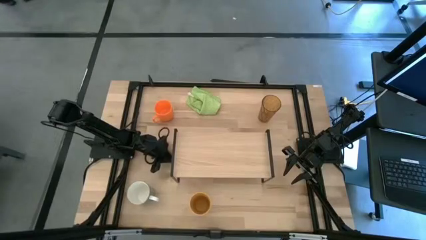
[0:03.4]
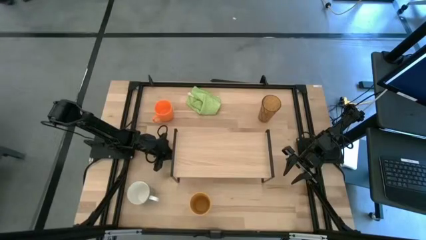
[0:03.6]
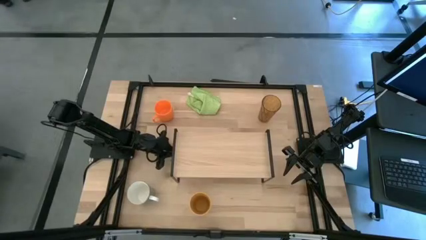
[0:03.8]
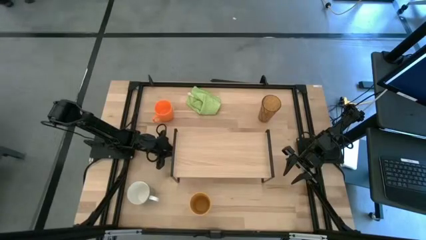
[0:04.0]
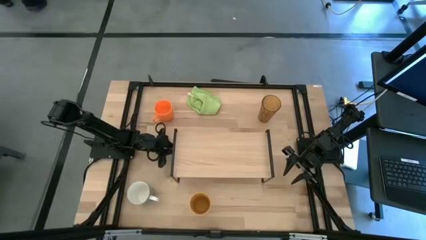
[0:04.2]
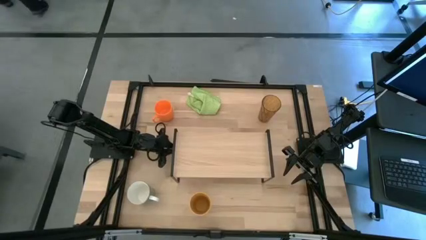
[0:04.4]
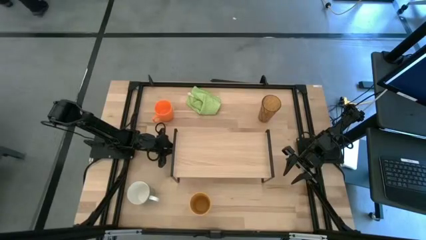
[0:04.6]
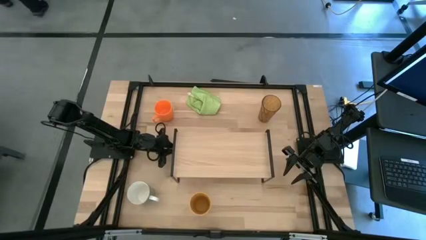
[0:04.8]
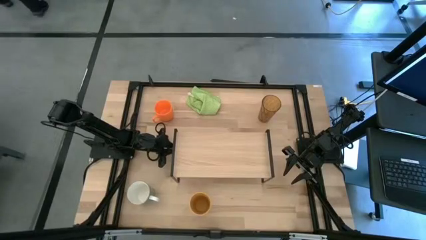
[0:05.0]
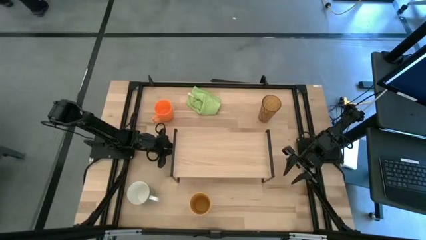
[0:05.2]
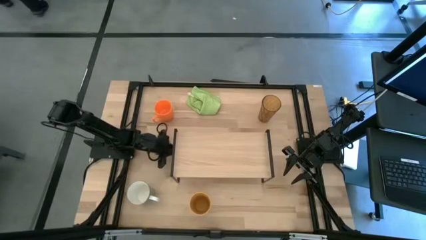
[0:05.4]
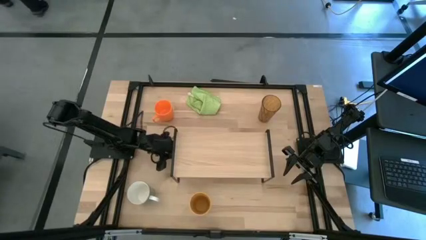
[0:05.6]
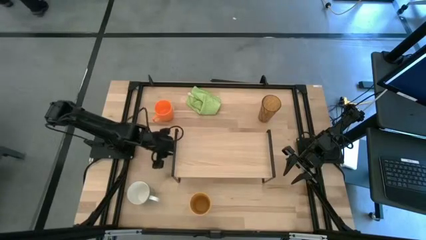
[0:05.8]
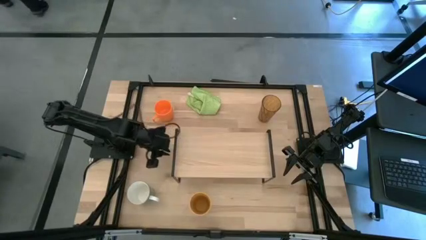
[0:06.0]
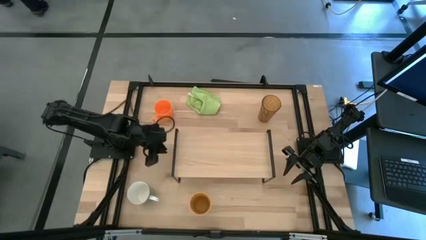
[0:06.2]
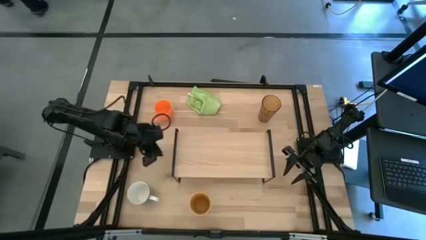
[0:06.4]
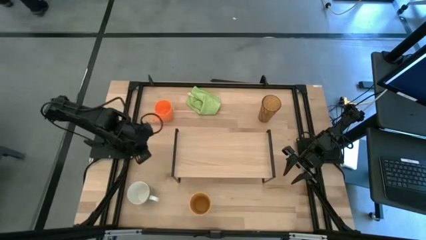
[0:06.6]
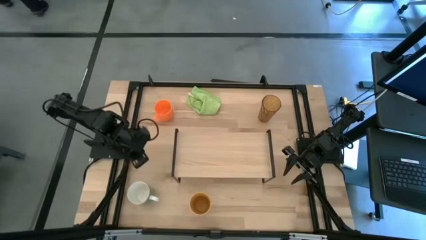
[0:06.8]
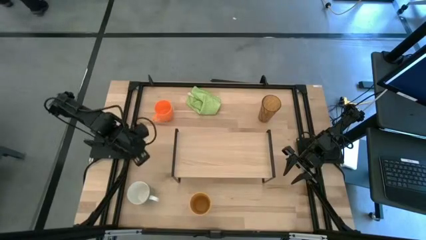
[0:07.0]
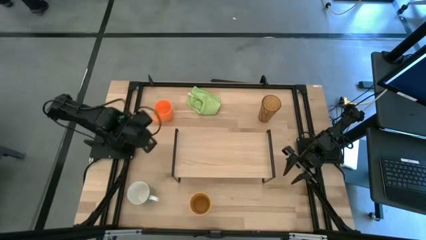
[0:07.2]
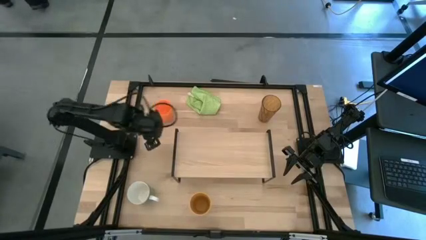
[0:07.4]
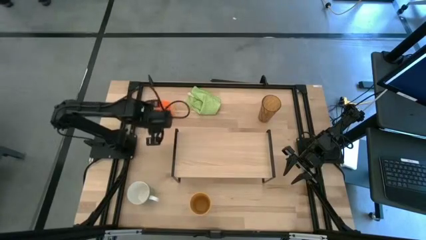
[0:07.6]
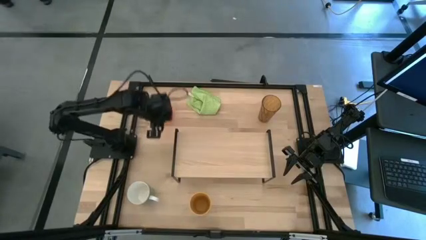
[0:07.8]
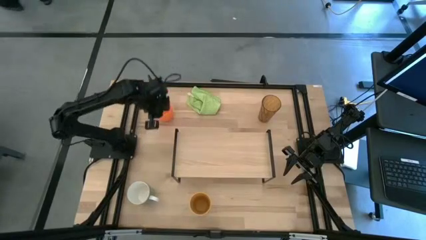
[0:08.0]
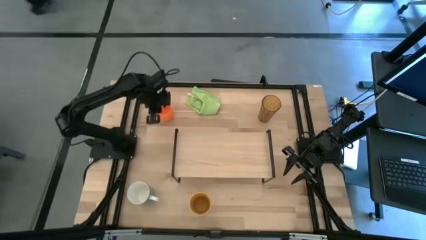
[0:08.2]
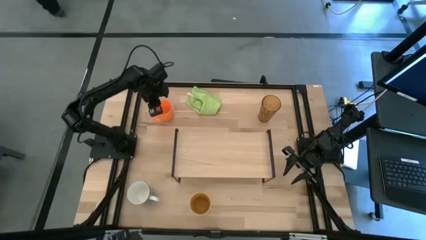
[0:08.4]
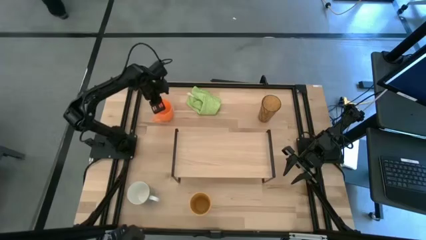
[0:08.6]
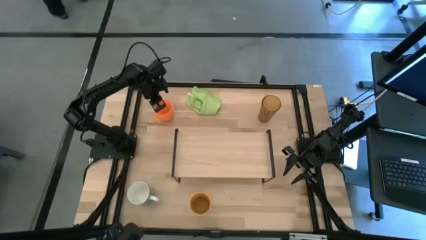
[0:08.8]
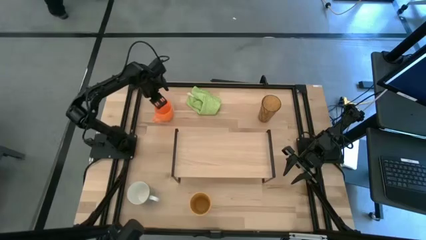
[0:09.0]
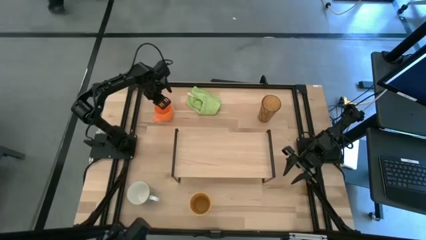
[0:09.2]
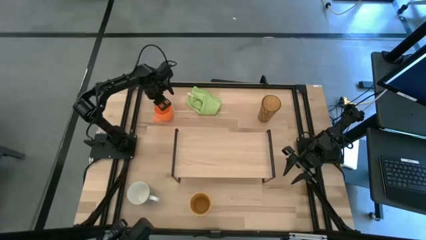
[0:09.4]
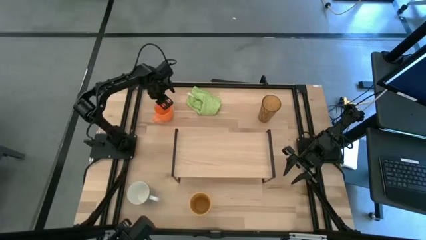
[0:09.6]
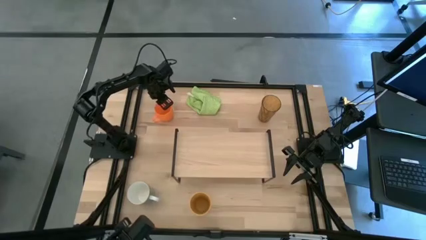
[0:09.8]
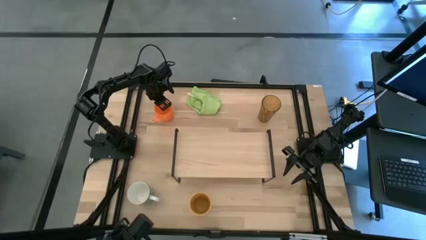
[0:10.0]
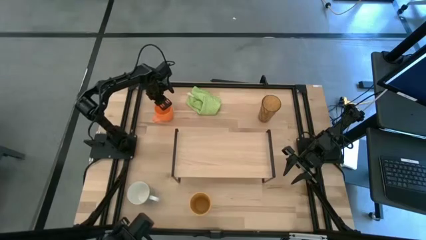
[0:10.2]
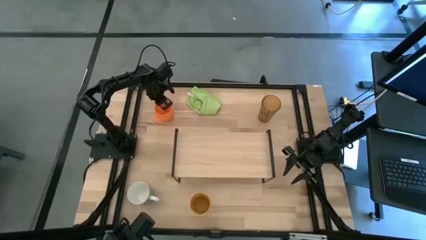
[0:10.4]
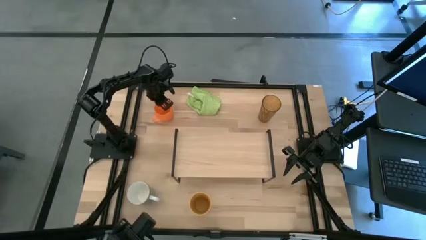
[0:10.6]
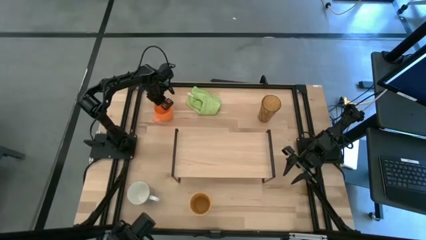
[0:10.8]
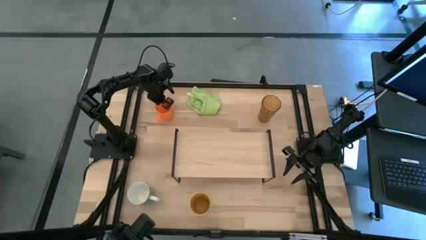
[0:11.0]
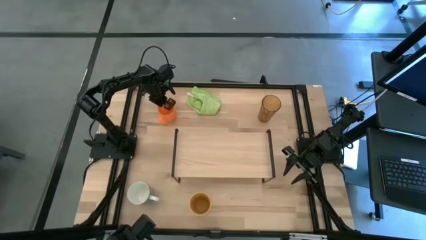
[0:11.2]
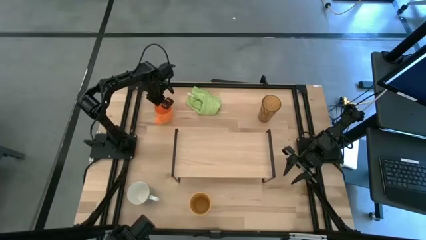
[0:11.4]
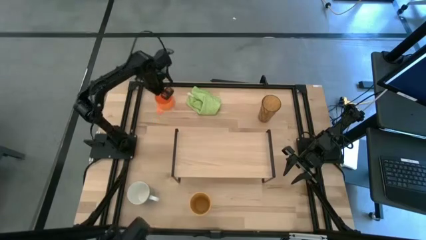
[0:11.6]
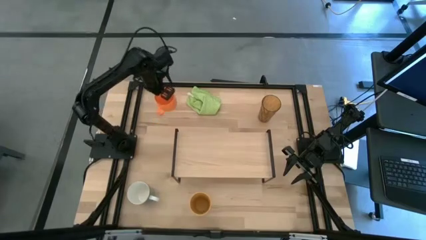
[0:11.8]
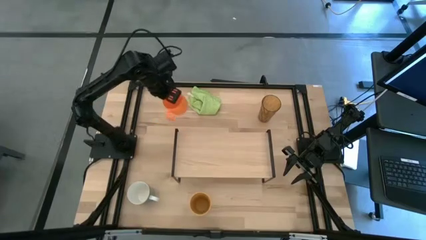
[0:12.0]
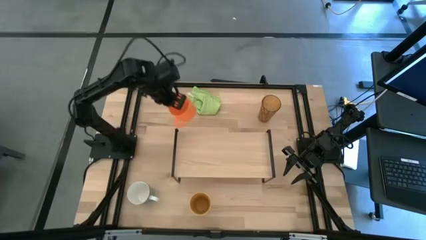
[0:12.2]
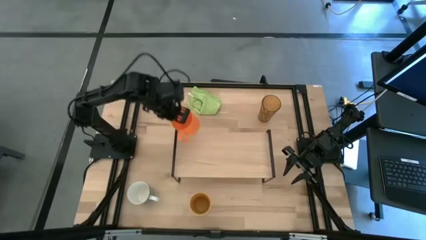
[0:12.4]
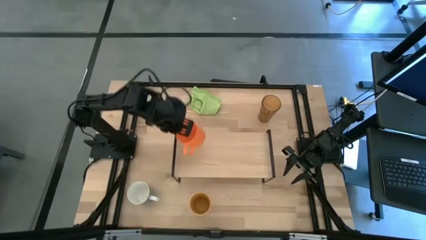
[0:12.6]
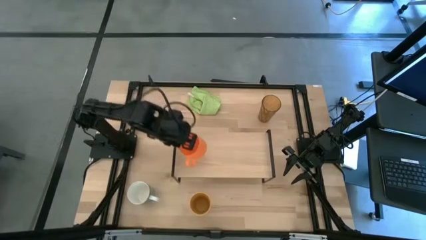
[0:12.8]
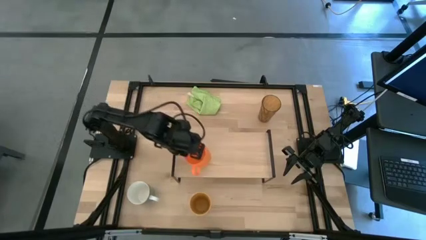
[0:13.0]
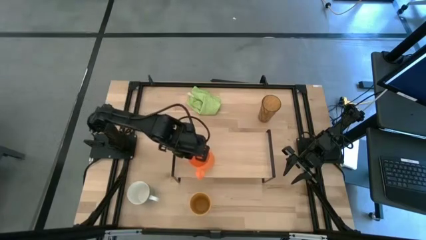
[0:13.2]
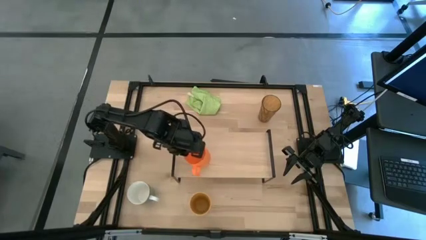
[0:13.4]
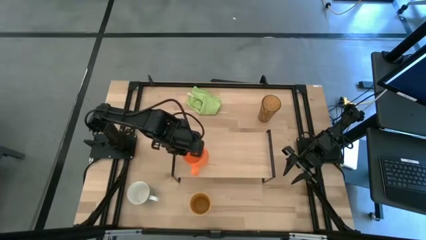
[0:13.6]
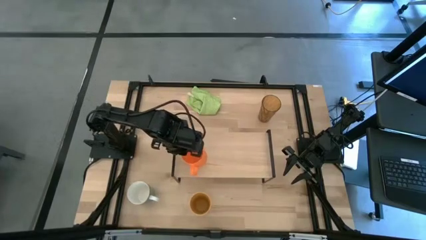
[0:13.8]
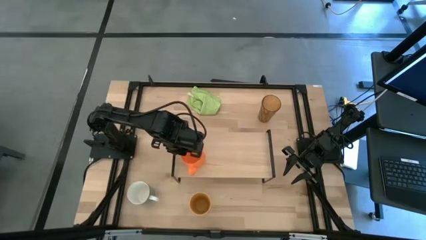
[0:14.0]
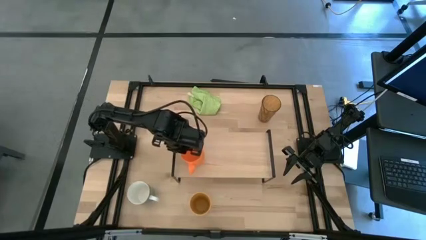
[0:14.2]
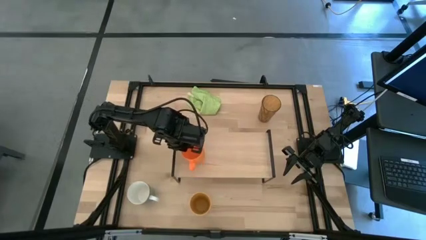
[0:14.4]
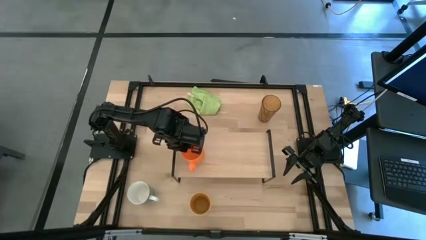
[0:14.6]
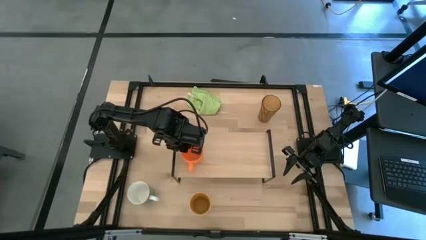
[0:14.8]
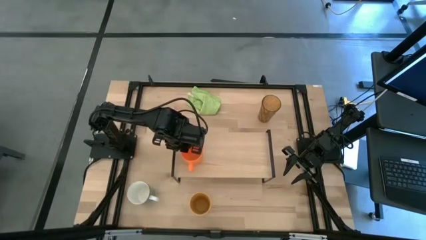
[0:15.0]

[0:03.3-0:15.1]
Task: Stack small to large cups/mugs on shelf
Put the orange mug on the shelf
